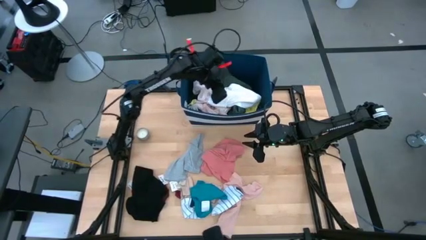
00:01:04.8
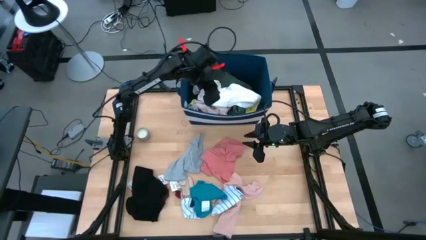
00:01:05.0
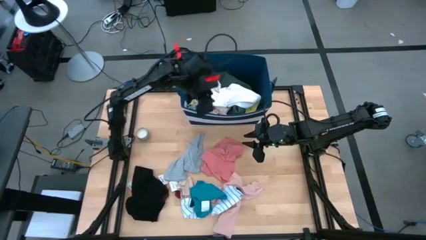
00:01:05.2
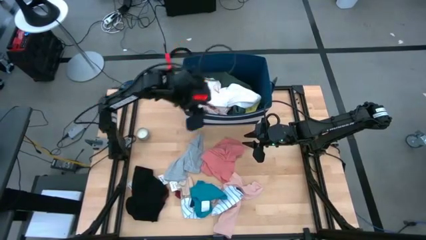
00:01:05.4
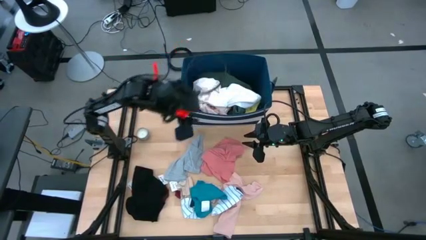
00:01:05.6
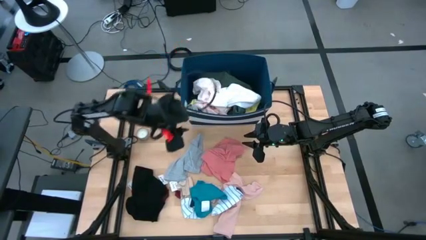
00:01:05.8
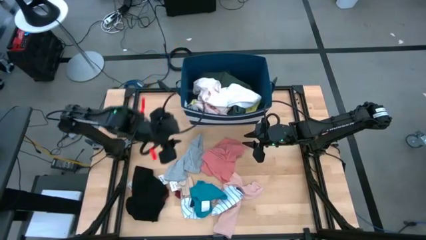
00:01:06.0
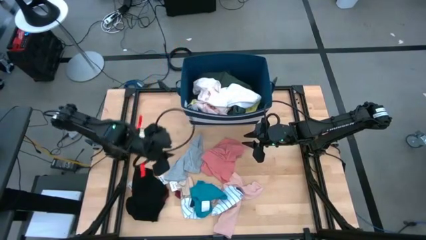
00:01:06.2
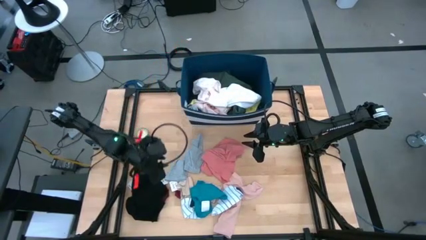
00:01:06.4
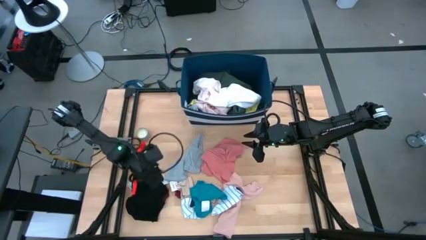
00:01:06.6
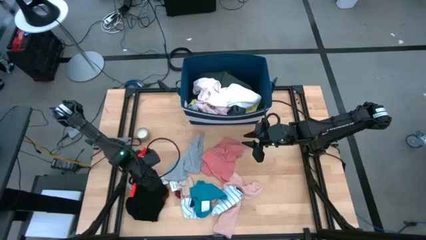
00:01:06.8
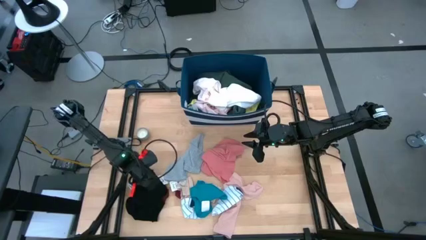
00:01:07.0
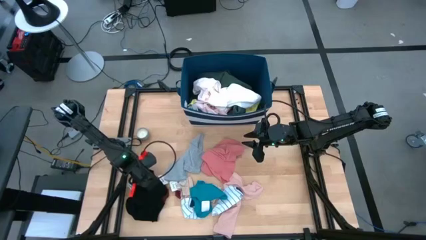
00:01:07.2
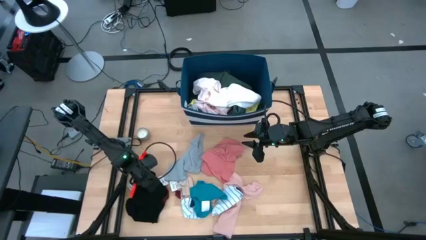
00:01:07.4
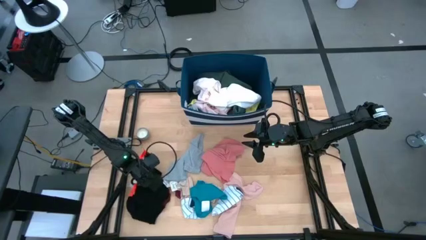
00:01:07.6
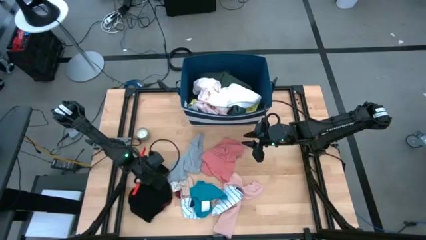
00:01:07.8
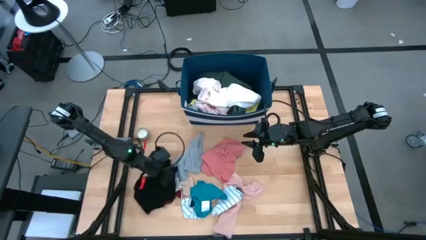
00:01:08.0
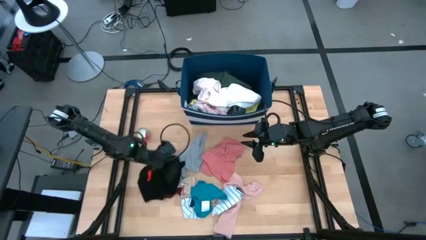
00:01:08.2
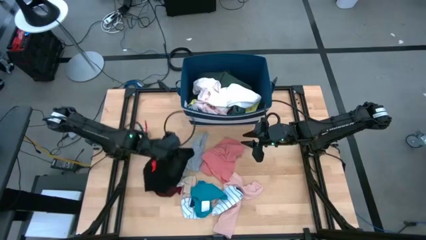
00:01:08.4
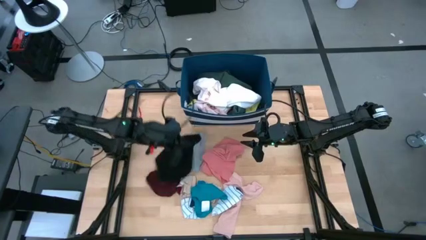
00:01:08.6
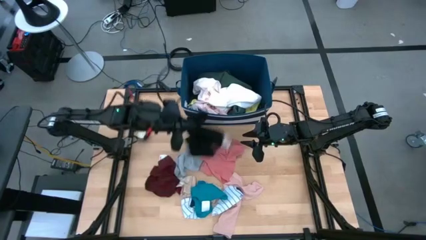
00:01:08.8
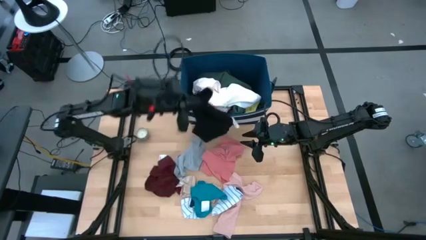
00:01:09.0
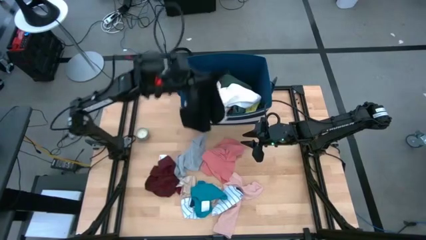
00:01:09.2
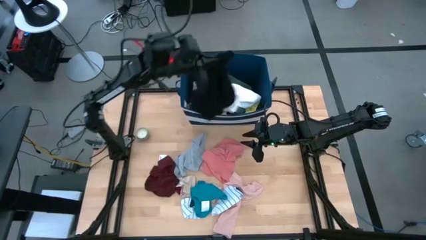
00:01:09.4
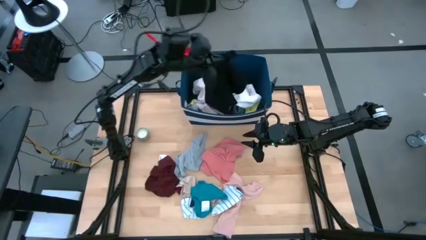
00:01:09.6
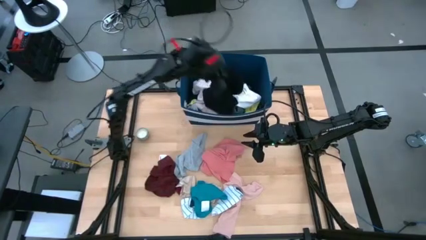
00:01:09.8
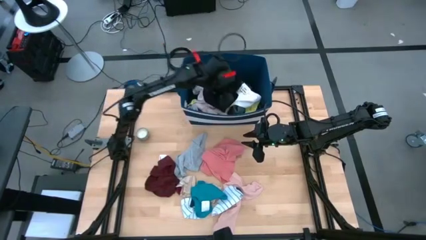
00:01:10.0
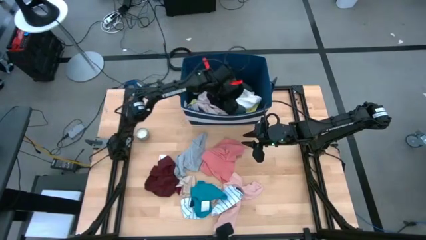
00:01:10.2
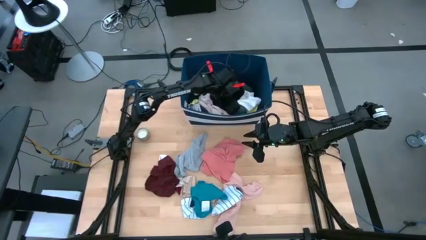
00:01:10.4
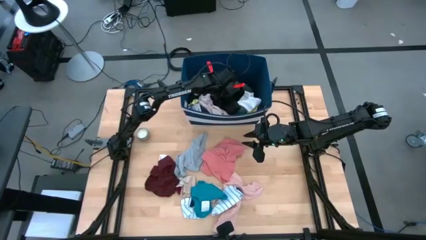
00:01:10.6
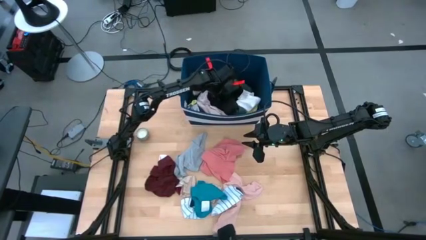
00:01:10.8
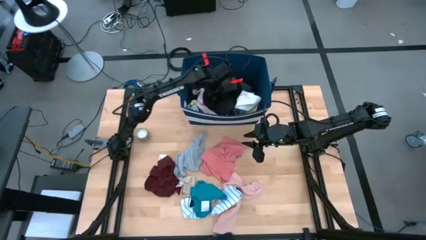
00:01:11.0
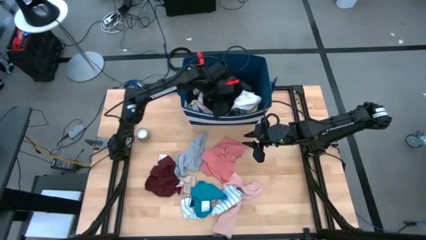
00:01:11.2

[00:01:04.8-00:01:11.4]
Task: Sort clothes
Put the black boxer into the blue laundry bin

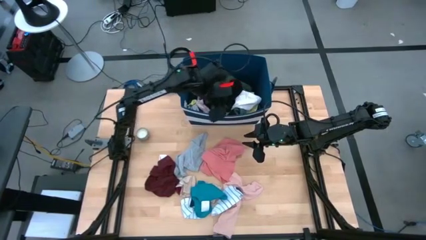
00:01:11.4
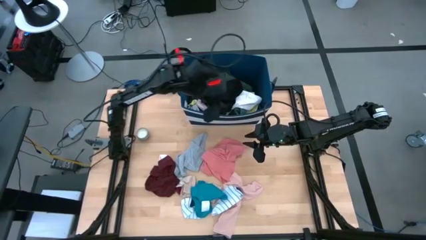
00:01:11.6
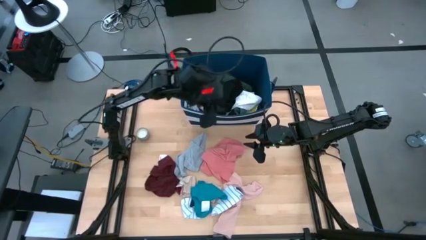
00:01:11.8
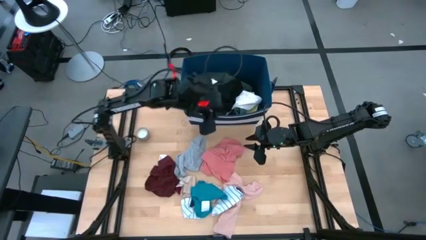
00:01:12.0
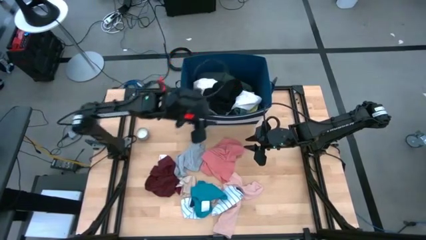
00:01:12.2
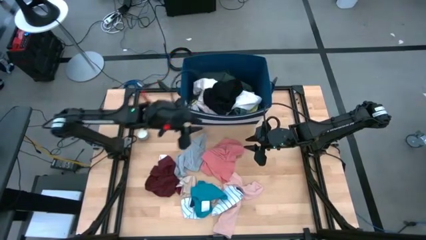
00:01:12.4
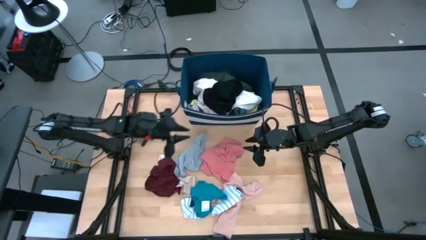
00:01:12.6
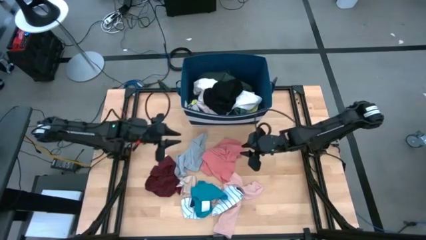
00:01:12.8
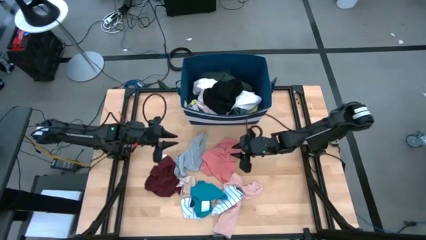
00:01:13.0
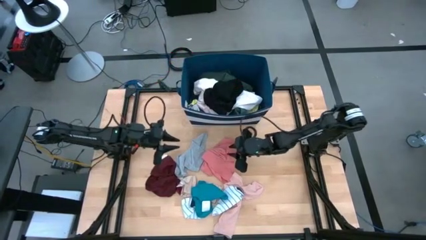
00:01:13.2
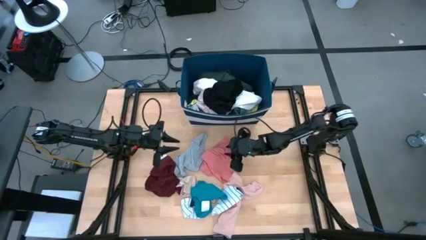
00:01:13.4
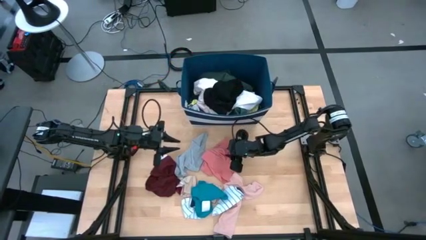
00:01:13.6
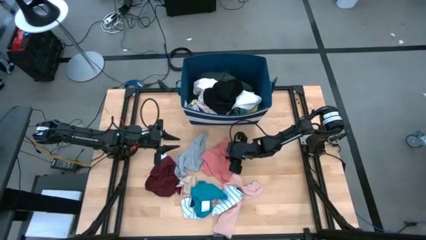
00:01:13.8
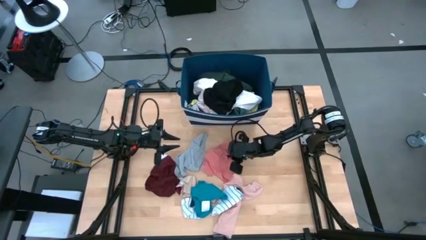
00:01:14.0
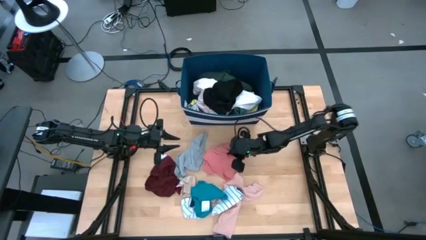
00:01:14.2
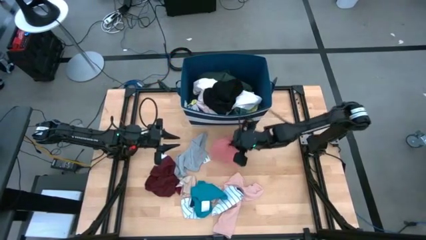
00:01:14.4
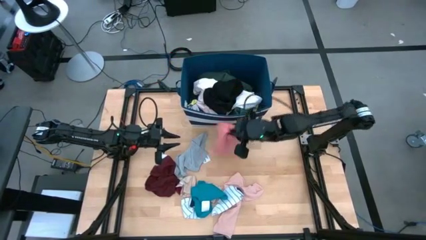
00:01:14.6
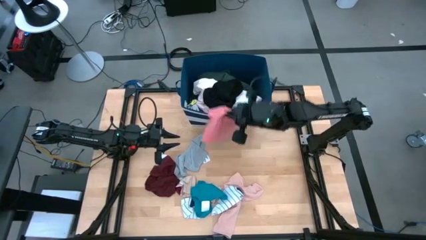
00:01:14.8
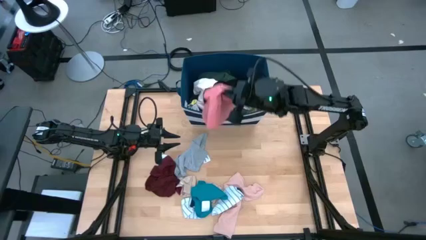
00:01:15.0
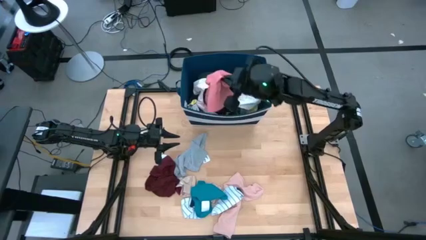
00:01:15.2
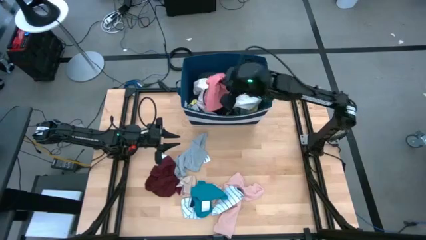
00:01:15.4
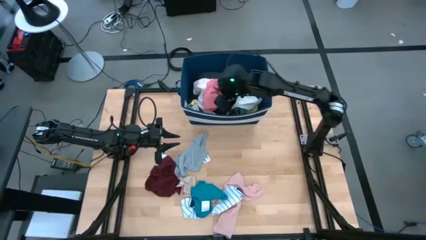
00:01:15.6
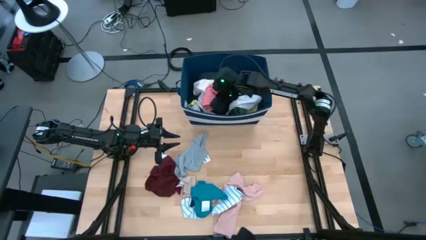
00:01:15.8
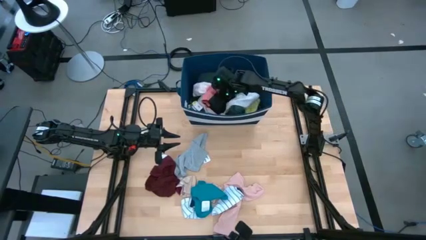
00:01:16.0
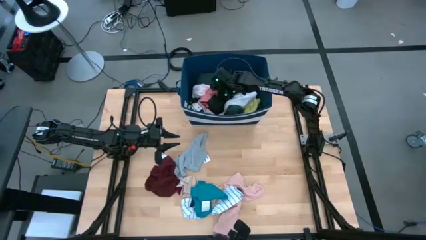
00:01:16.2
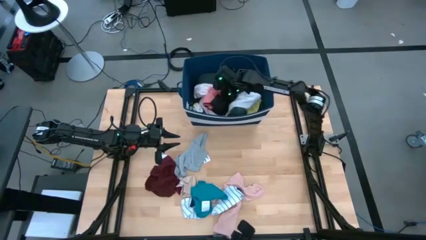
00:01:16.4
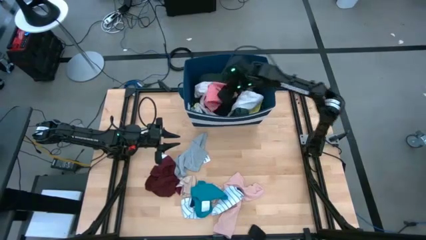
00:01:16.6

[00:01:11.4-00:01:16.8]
Put the pink boxer into the blue laundry bin

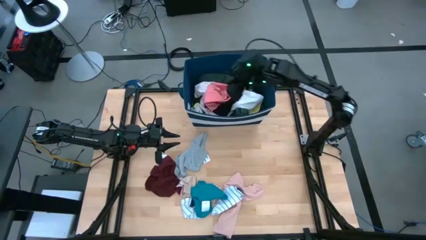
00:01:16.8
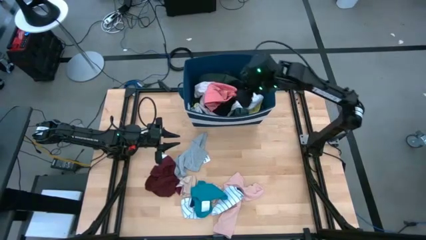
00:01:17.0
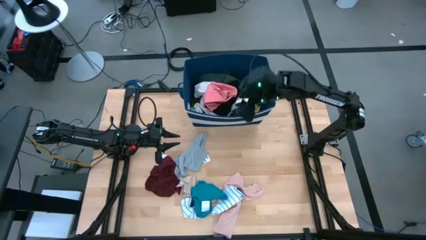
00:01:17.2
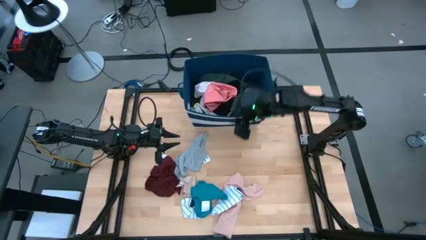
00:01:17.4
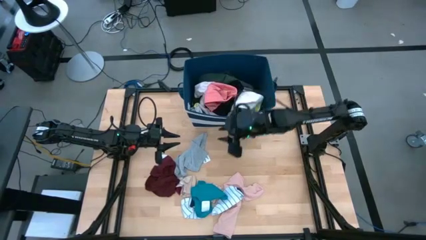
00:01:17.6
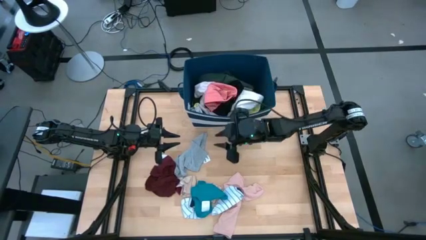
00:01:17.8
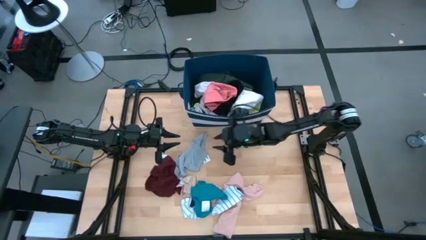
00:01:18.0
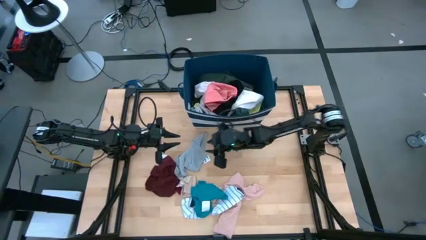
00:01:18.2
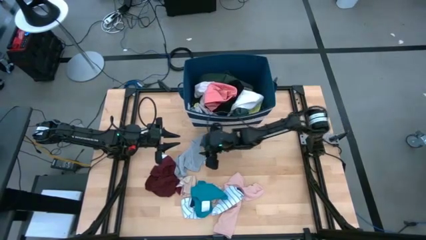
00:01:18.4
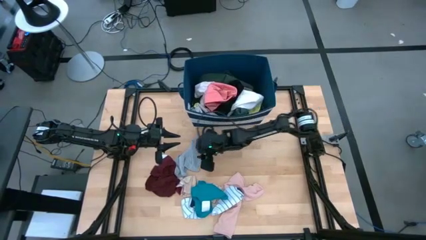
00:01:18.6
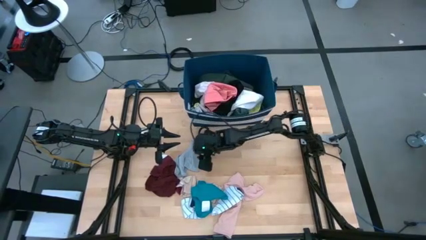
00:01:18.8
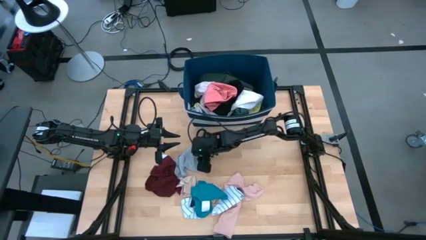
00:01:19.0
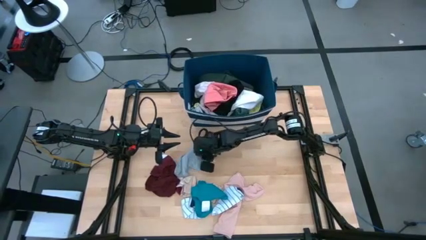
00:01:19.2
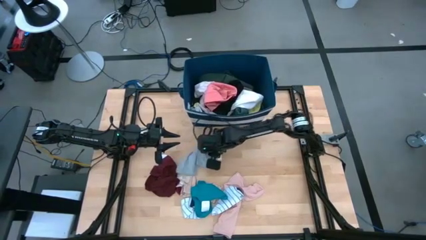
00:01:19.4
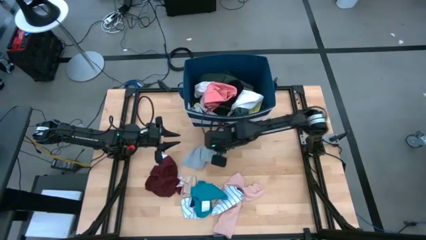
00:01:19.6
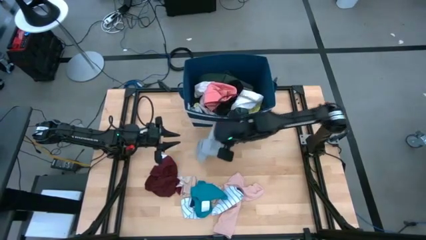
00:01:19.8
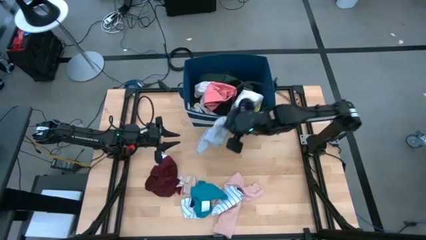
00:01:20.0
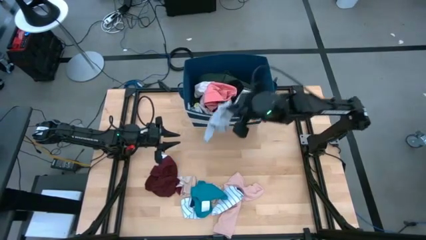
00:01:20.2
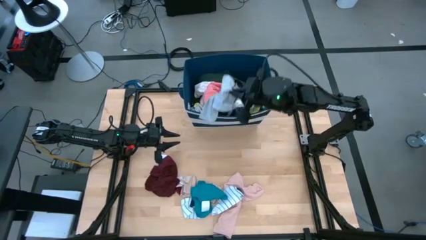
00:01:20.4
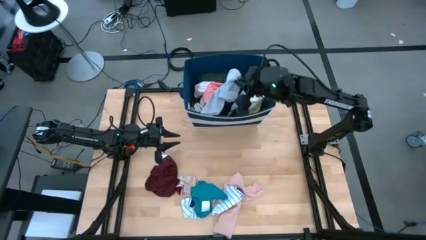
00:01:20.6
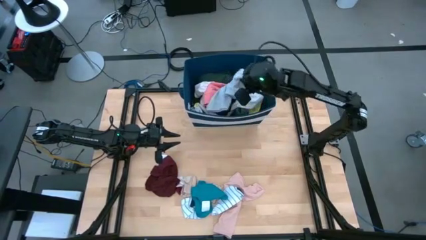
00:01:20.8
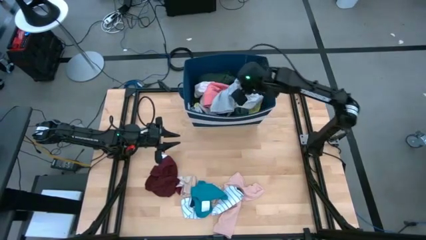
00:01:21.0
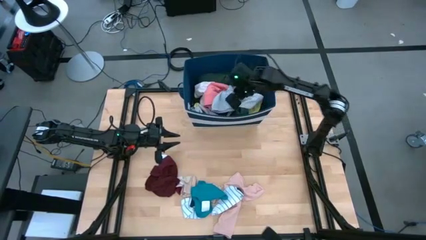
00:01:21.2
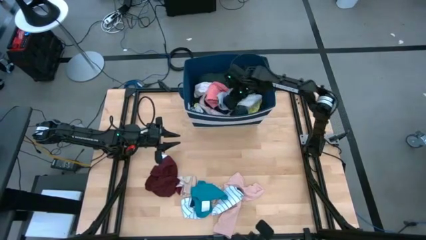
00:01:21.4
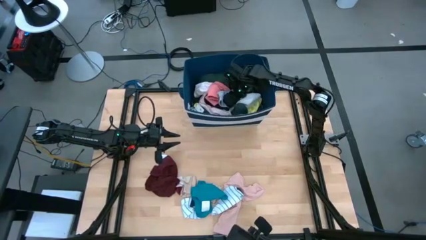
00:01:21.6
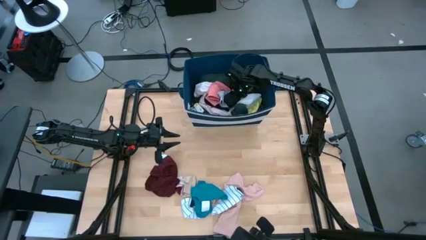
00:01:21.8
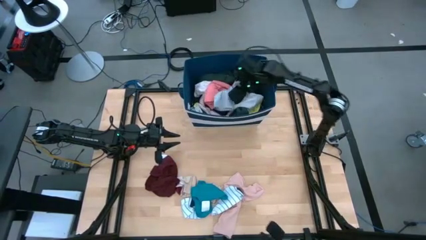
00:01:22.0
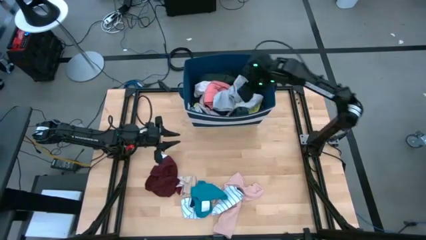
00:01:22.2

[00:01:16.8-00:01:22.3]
Put the gray boxer into the blue laundry bin
